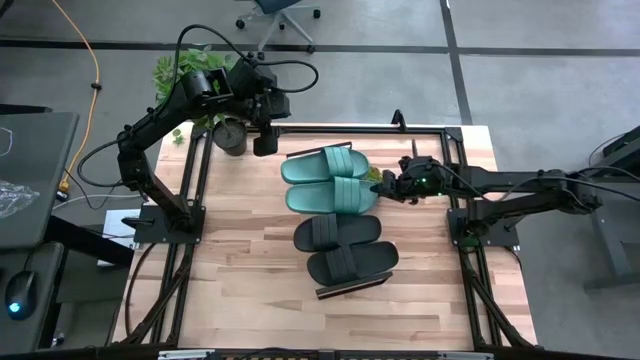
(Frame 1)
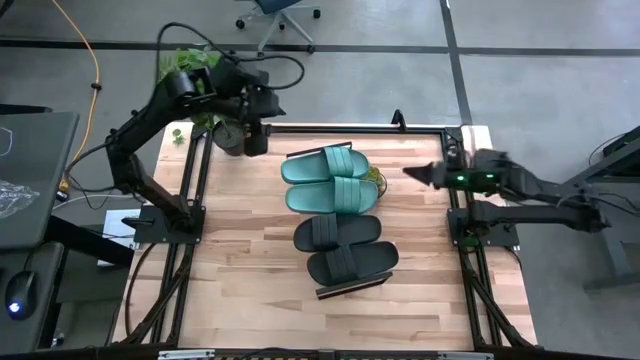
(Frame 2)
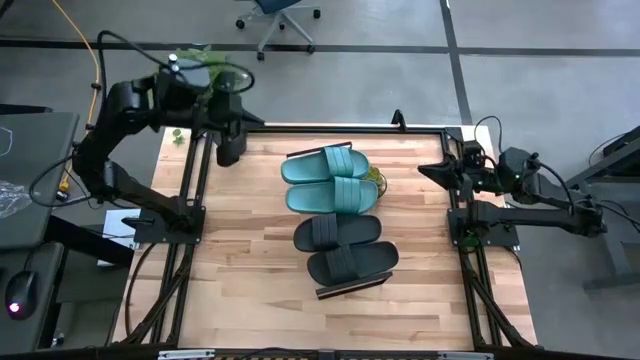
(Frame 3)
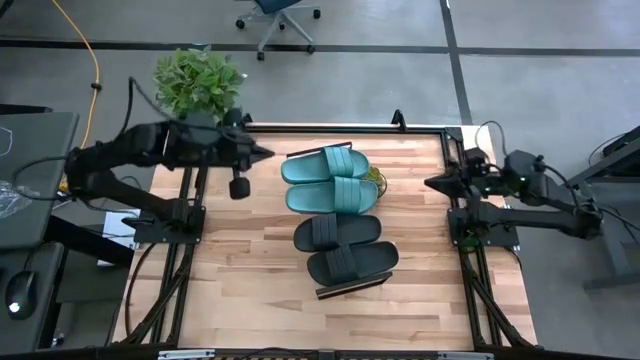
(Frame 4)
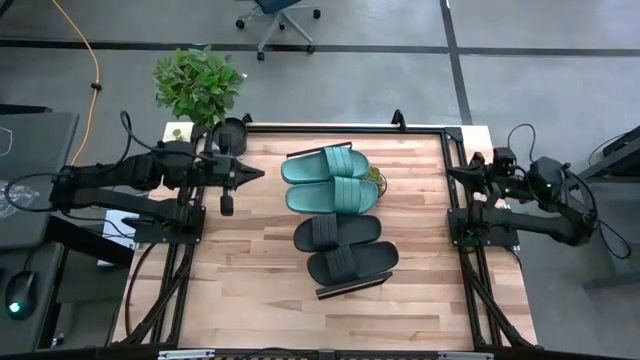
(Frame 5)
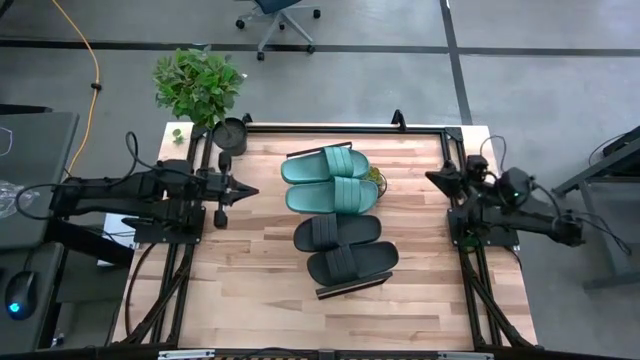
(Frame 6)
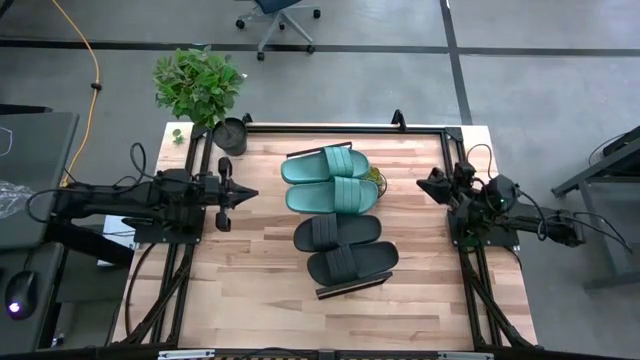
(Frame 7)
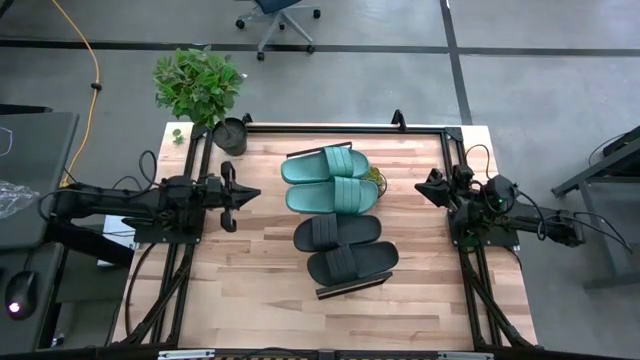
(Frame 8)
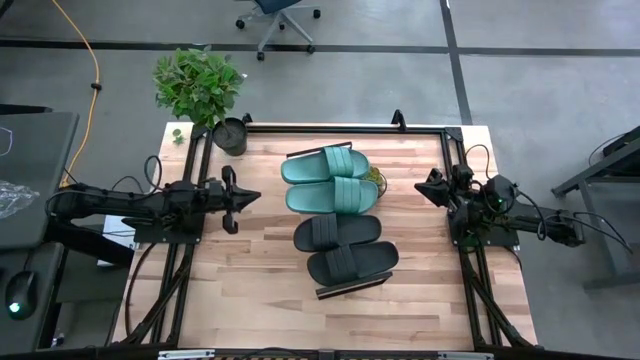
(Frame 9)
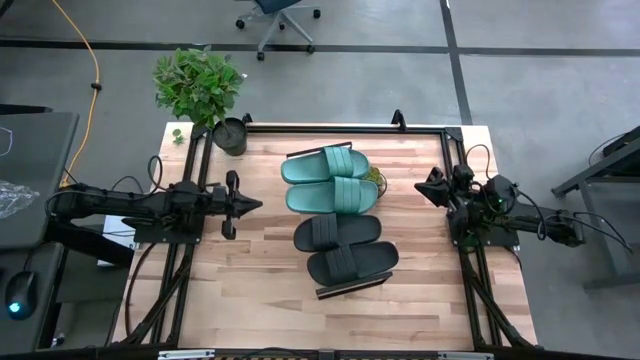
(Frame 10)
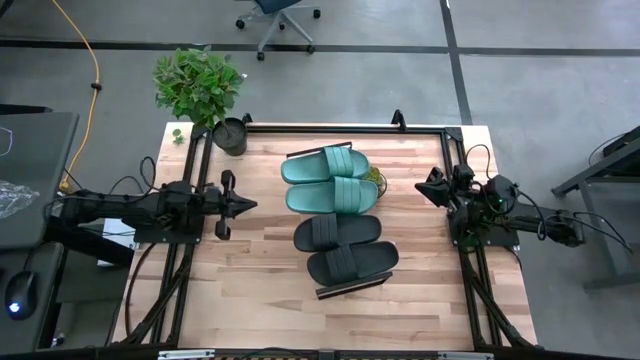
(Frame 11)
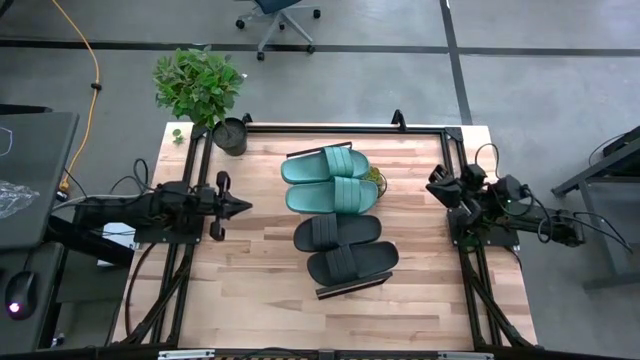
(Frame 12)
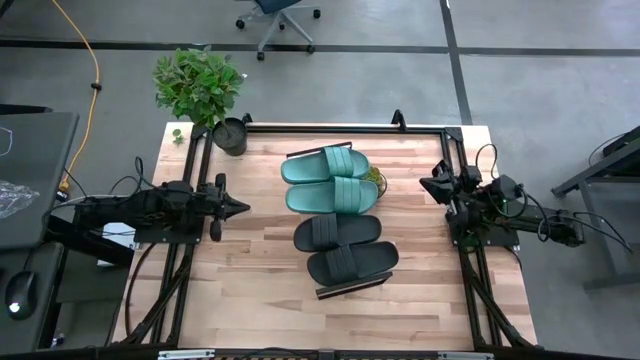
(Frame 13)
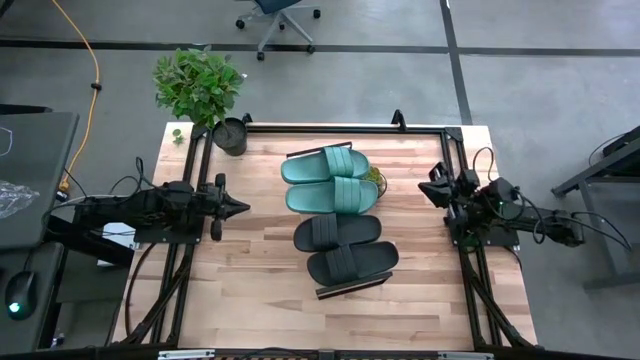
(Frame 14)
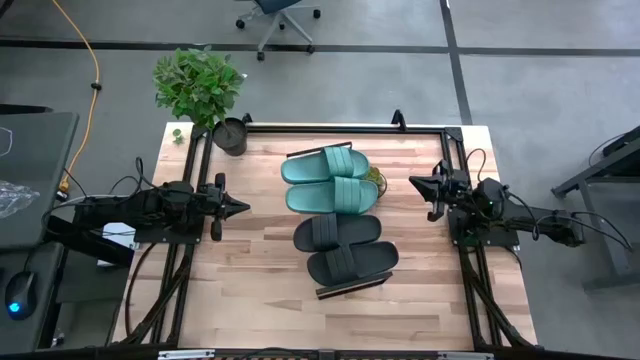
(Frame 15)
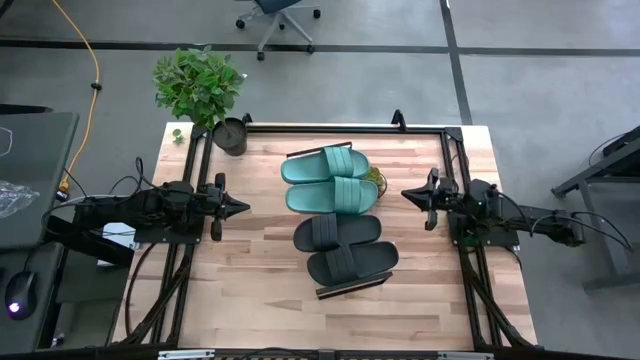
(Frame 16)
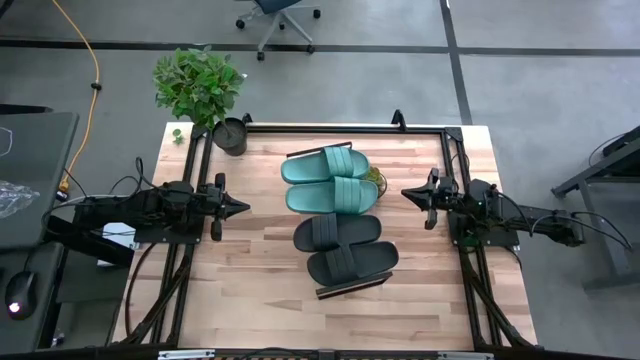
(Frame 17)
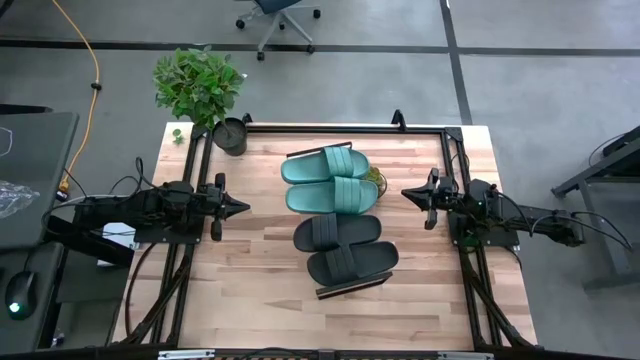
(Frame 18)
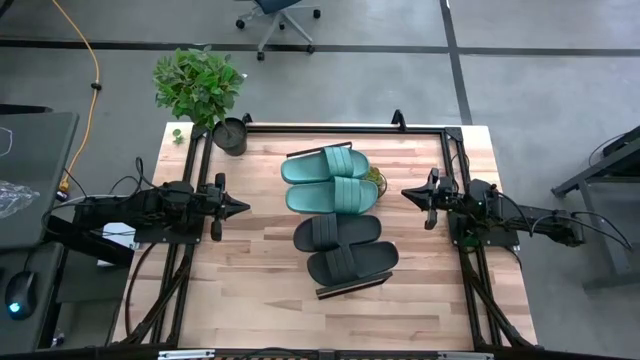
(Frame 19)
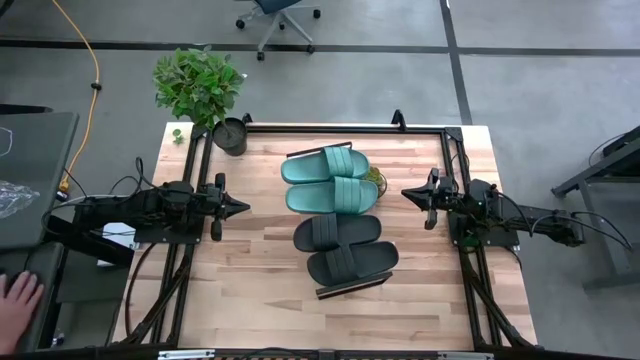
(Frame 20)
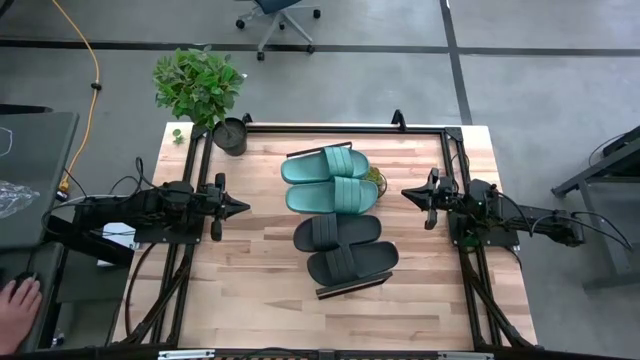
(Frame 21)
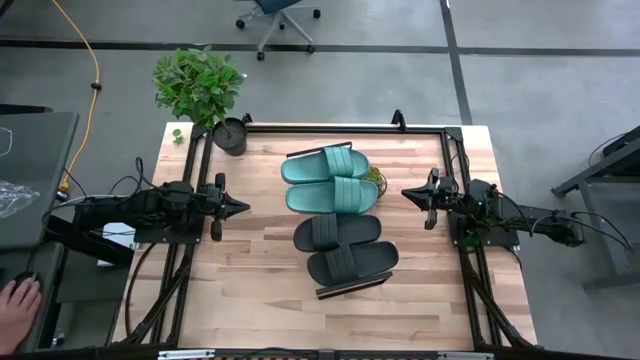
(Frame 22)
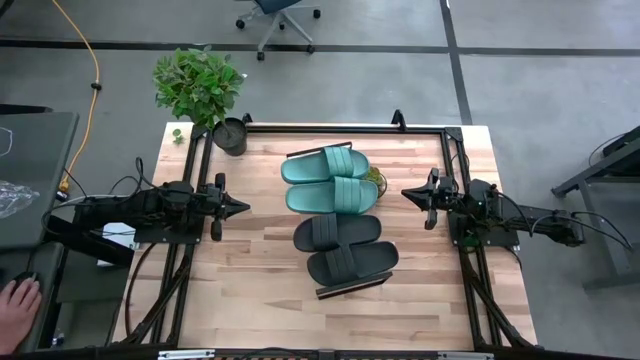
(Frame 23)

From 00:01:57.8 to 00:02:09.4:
Task: Pick and place slides into the shelf
Return to Home Position

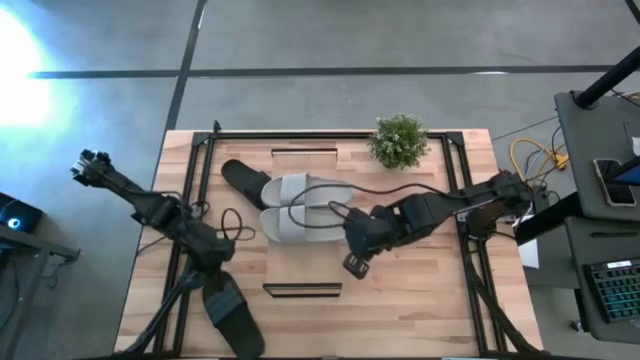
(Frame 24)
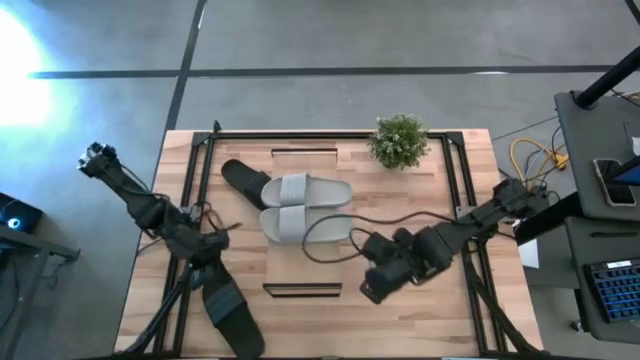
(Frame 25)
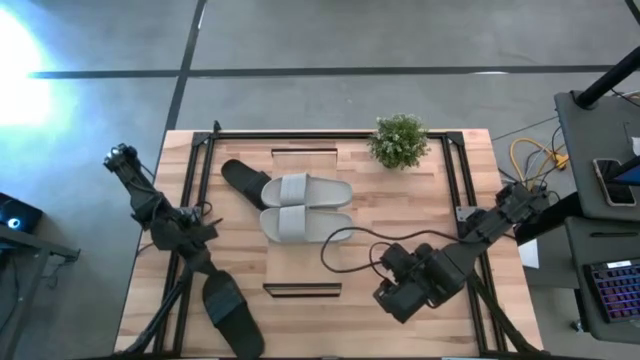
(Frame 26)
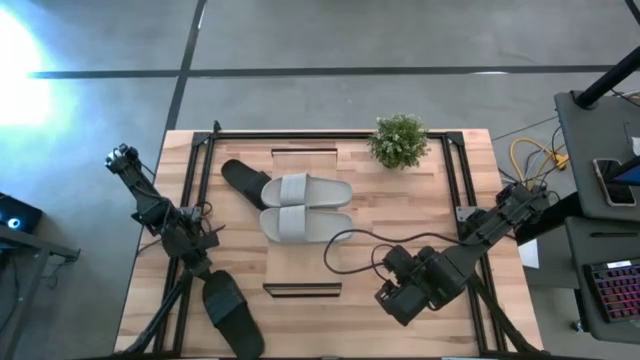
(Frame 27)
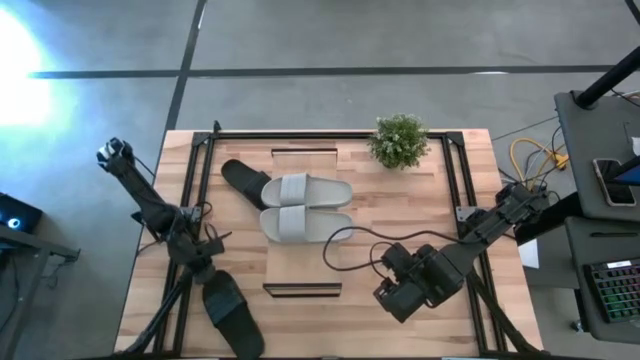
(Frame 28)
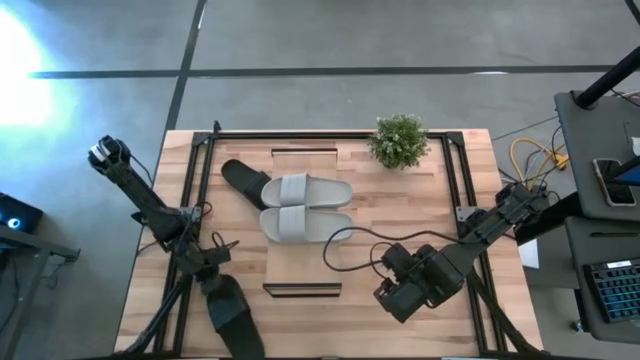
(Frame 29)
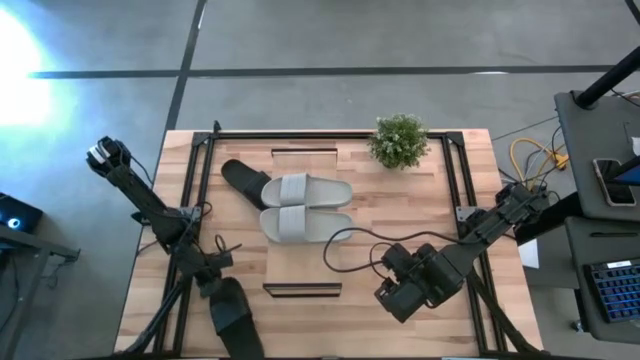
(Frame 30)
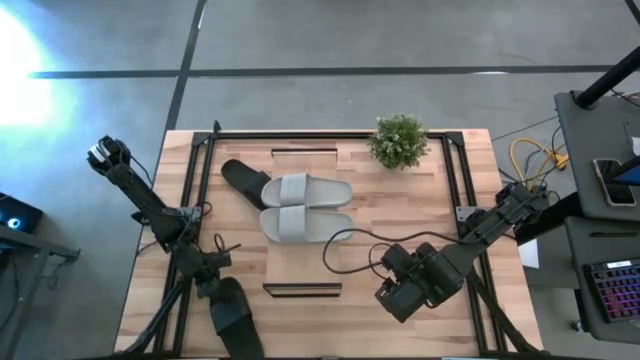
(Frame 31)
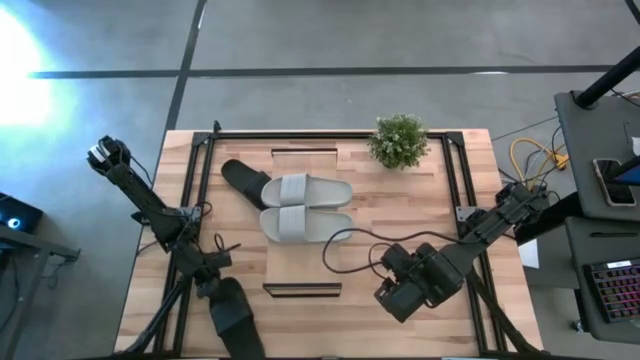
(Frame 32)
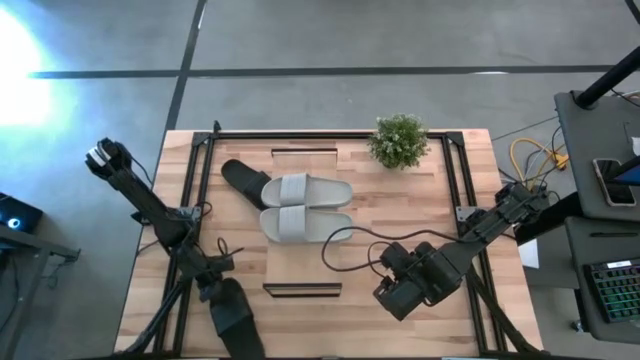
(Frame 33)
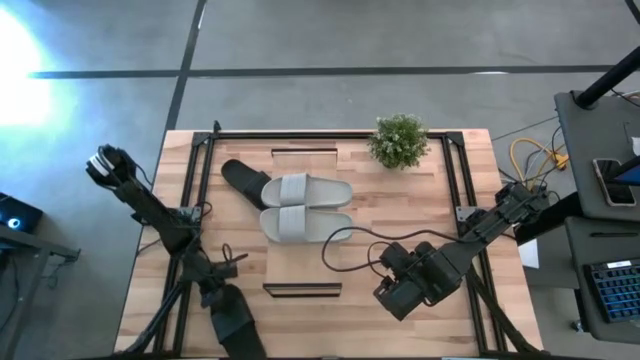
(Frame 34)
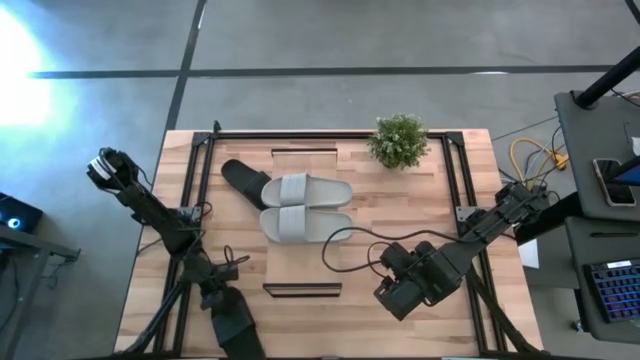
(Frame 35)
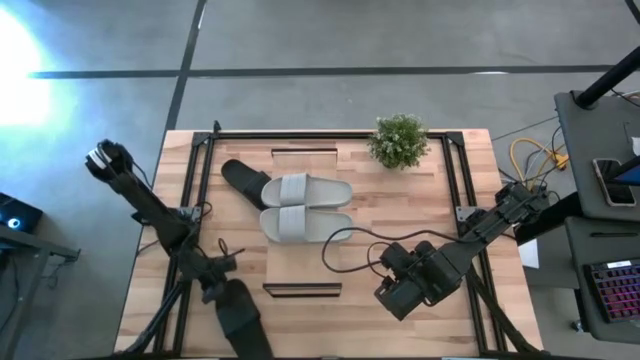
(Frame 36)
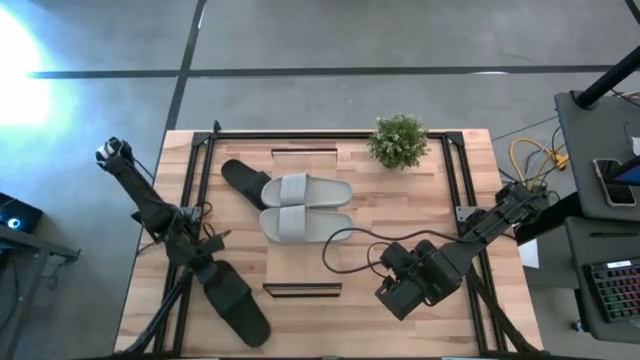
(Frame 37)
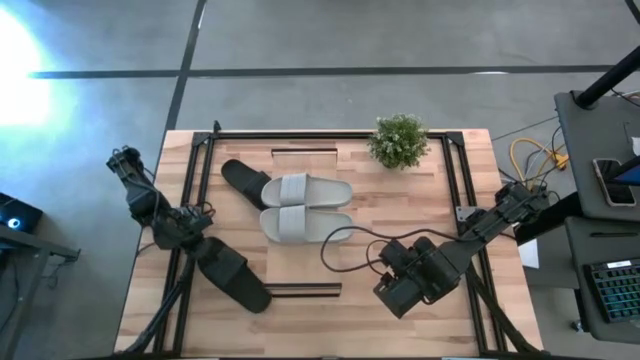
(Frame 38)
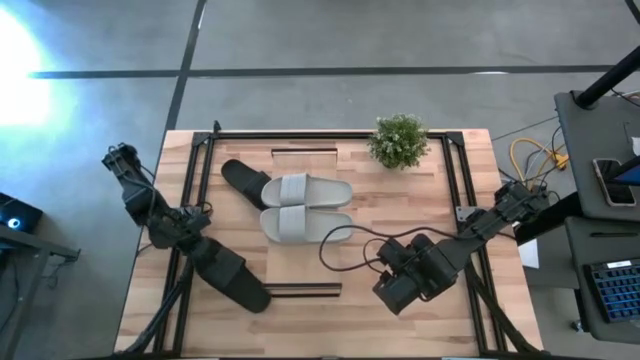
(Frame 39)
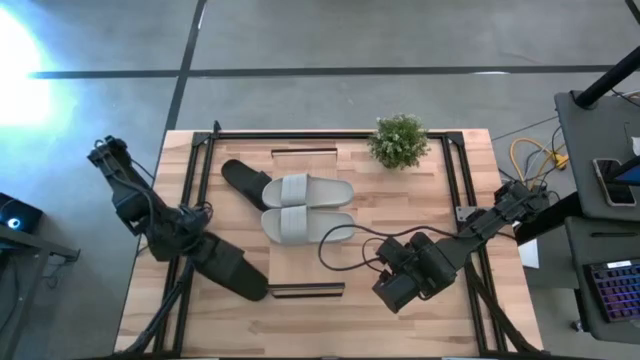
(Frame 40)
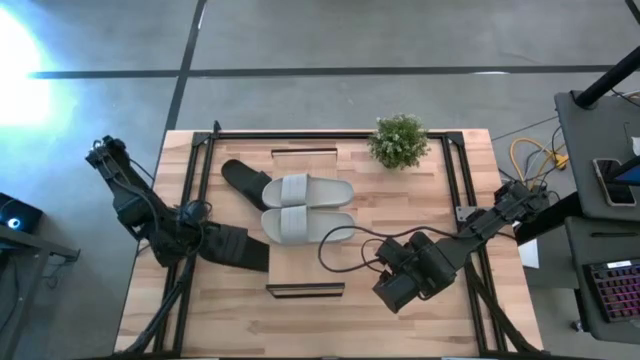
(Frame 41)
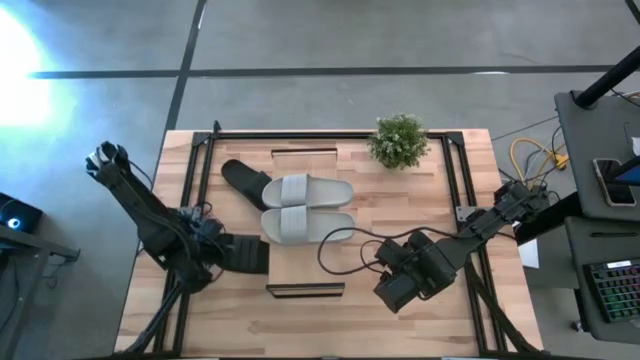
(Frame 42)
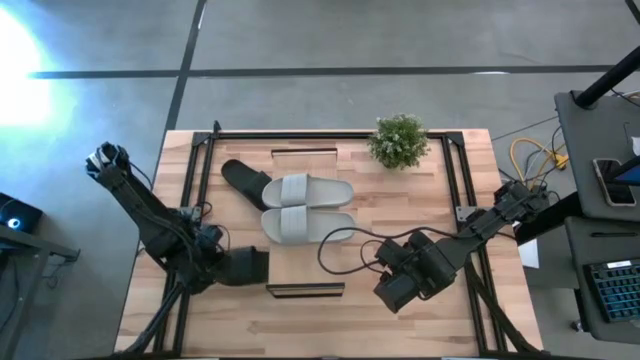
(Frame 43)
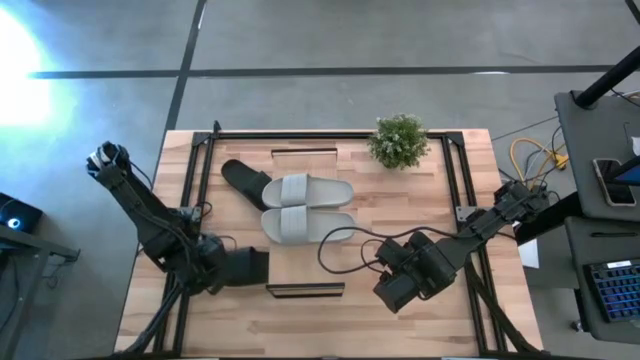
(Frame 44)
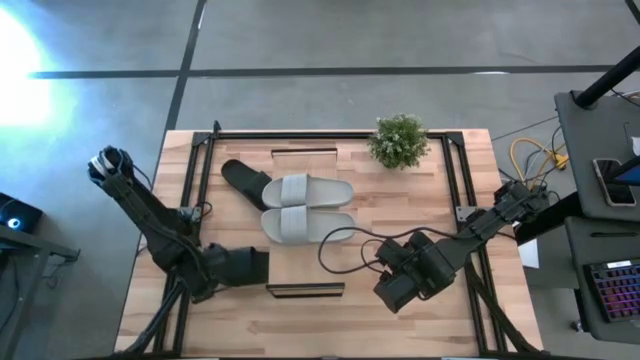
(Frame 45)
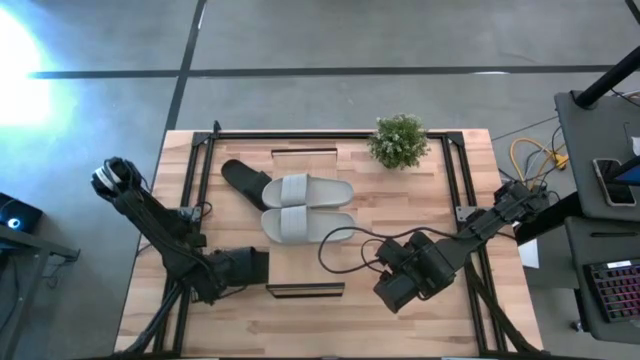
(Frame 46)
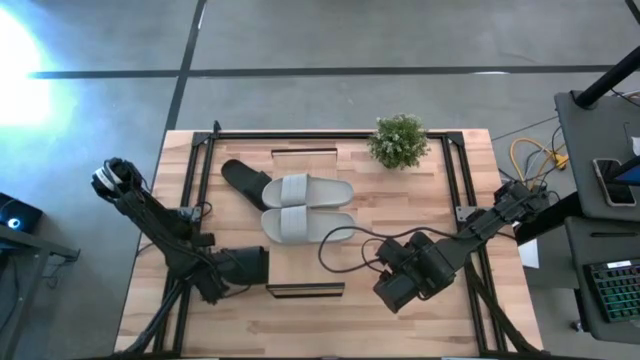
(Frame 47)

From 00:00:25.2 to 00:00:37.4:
Task: Pick and place slides into the shelf
Move the bottom black slide under the shelf
